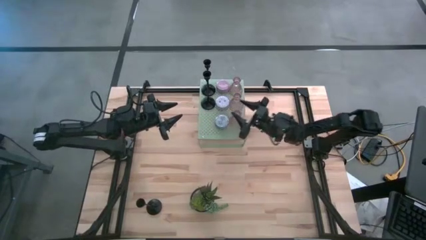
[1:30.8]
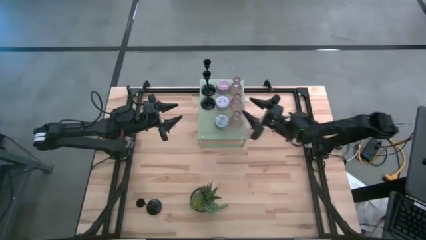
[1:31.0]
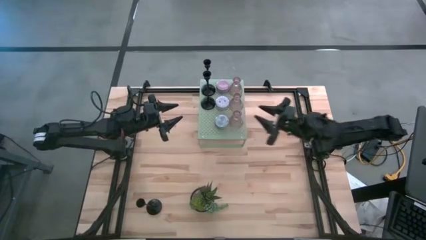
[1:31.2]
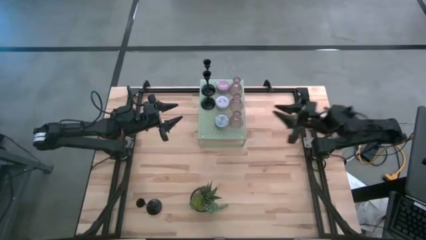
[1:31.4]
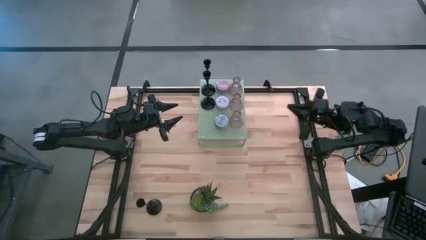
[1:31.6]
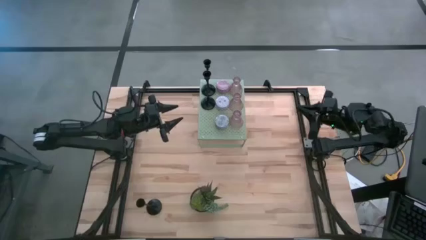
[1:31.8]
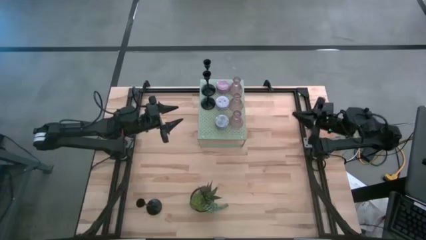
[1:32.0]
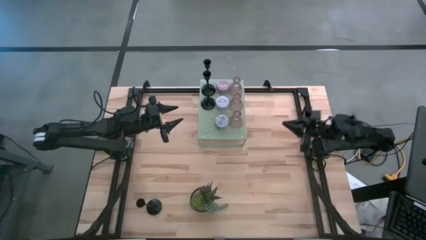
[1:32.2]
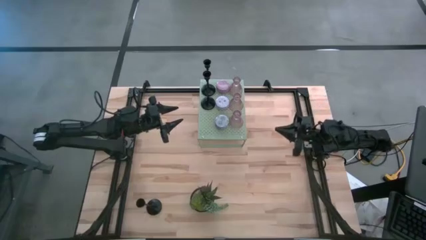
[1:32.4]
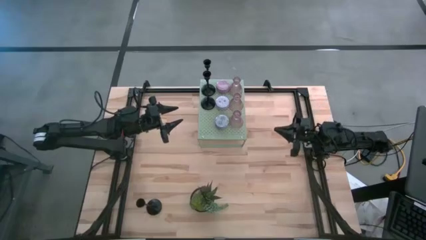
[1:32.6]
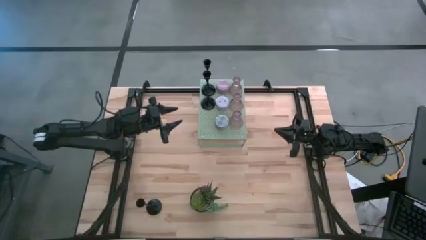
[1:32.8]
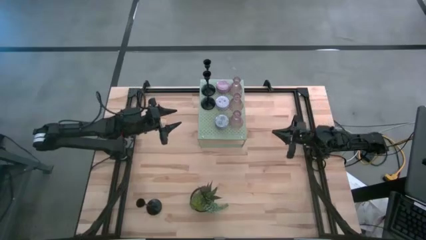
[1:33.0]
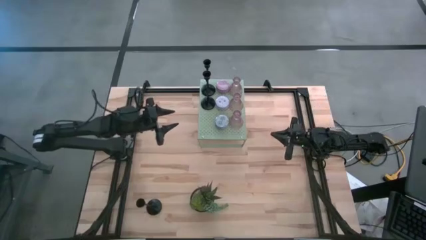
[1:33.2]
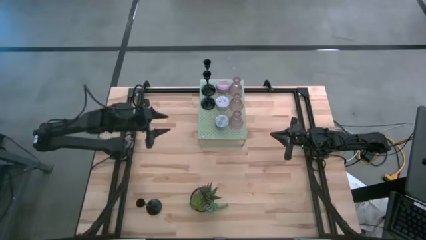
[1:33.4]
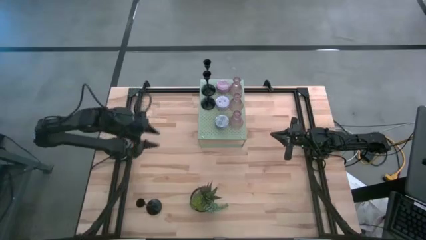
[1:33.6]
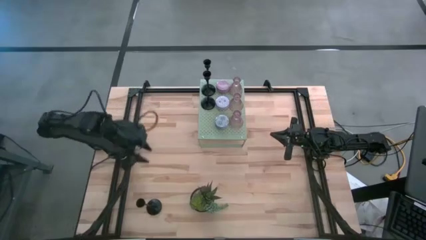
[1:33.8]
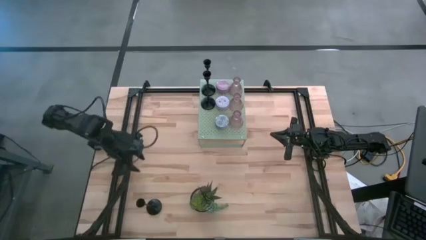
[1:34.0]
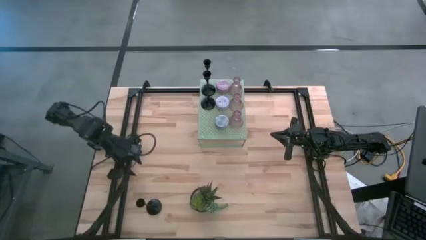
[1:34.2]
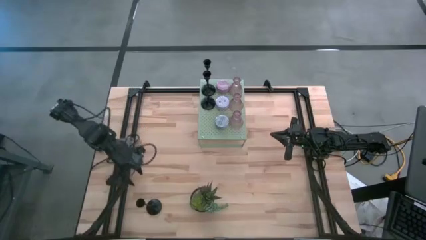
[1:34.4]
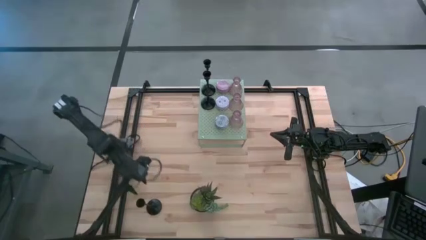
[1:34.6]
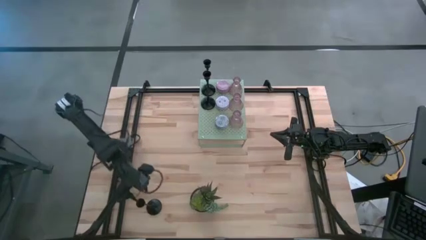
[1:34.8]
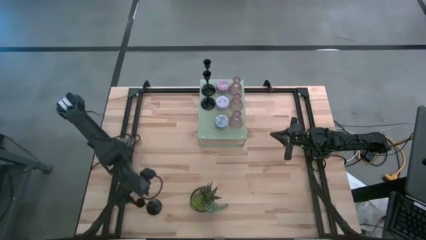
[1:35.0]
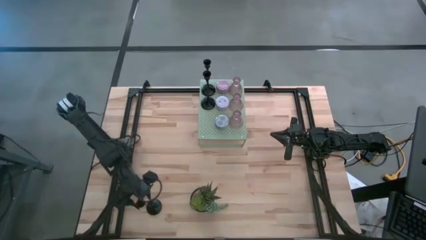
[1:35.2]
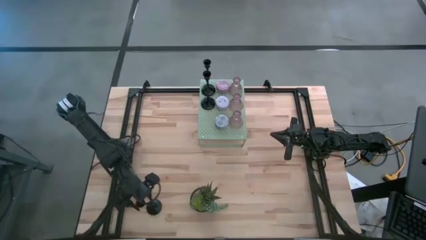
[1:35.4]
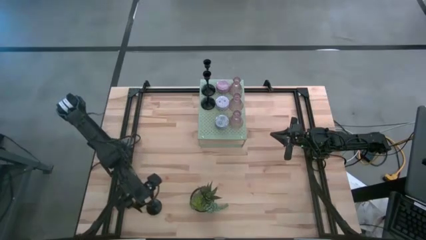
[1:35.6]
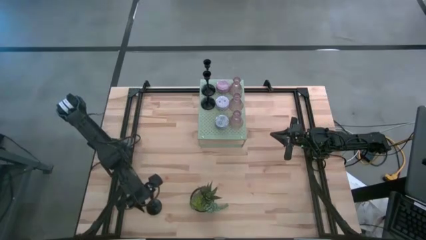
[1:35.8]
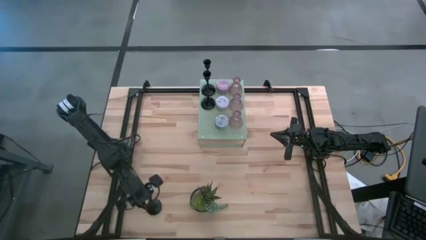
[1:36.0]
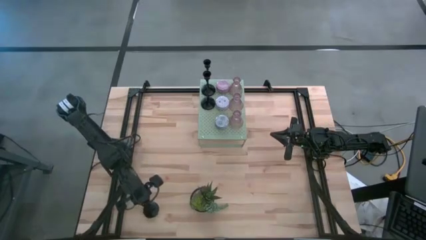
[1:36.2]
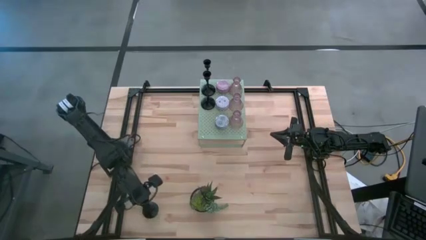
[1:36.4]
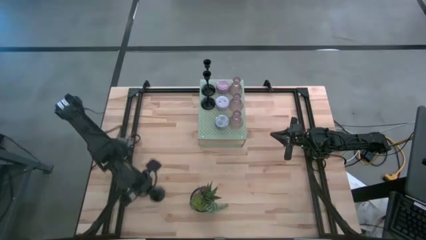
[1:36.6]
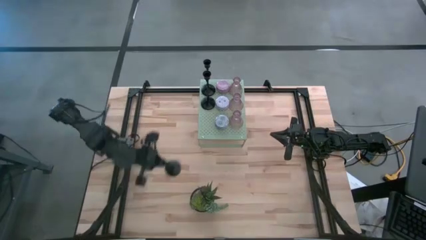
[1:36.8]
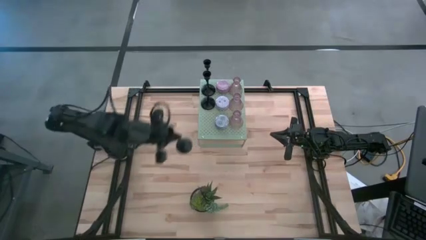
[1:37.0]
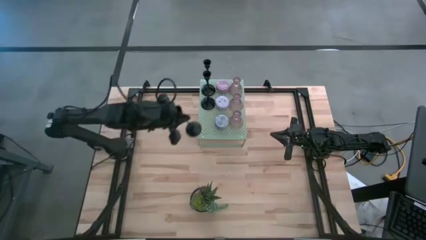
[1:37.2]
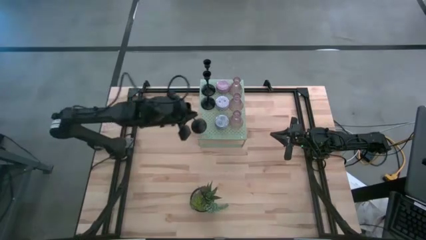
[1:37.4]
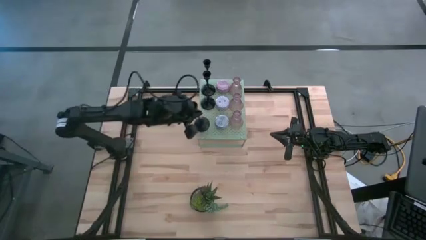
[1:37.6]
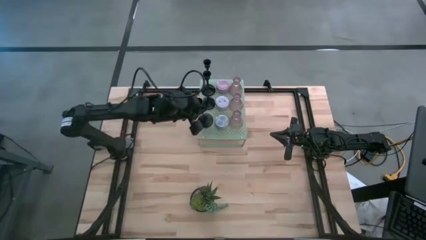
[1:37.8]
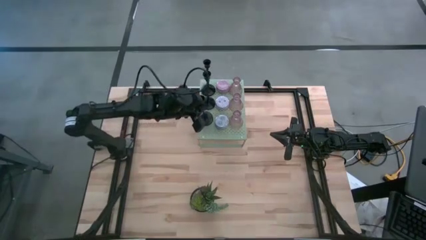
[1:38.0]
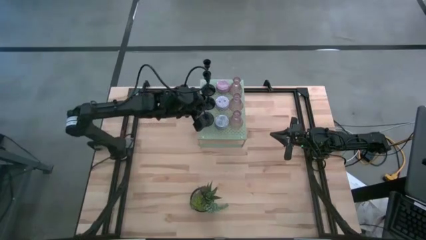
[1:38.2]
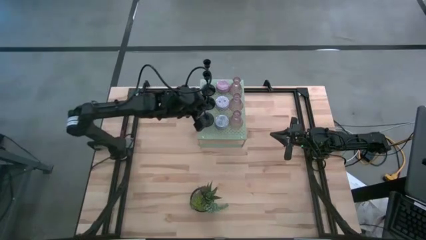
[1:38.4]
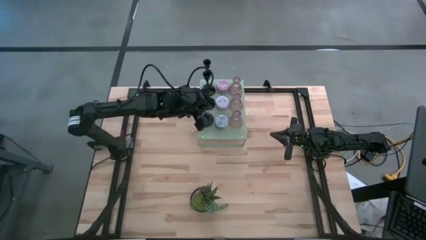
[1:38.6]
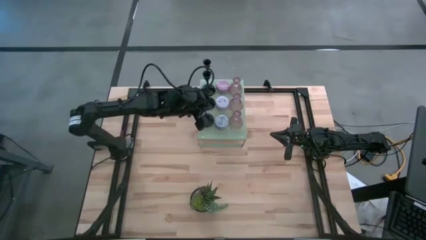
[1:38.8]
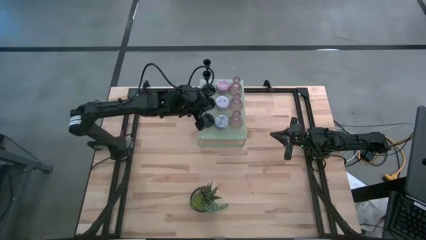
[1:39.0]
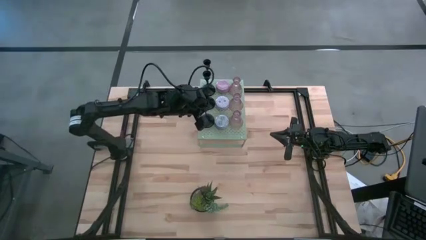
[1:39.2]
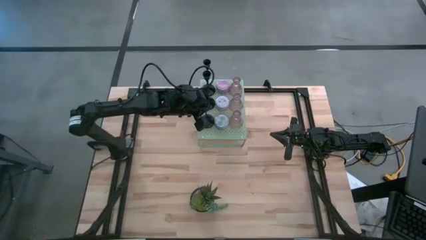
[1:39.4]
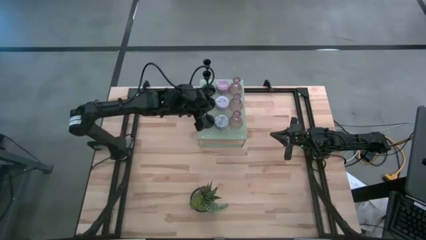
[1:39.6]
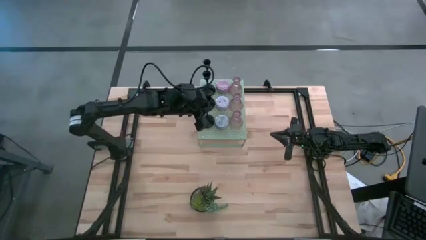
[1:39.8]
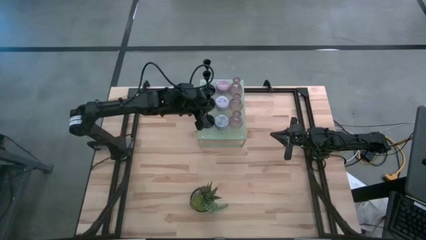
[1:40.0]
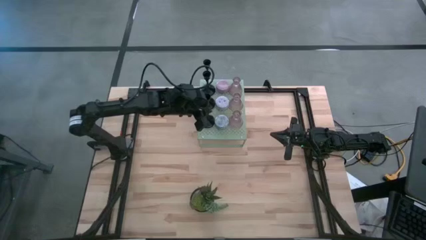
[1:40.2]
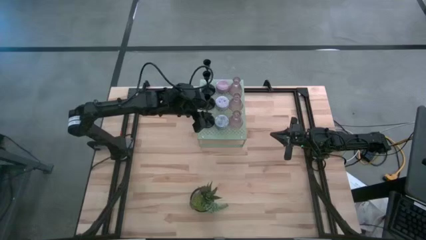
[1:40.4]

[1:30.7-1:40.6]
Task: Pick & Place candle stick holders
Put the black candle holder on the shelf aligned with the other black candle holders

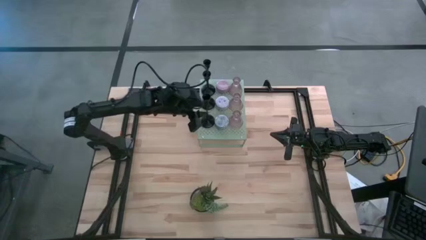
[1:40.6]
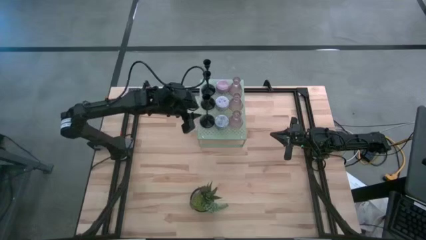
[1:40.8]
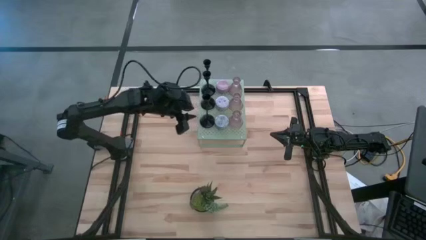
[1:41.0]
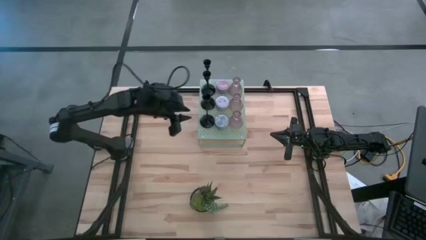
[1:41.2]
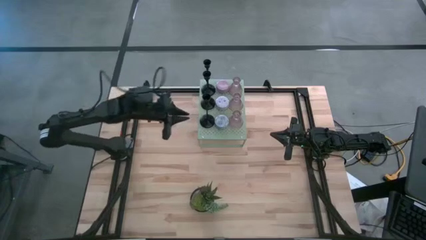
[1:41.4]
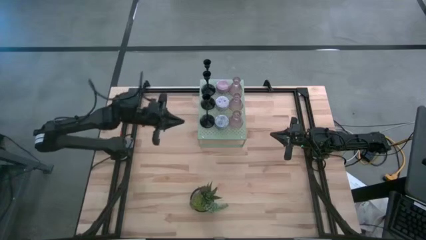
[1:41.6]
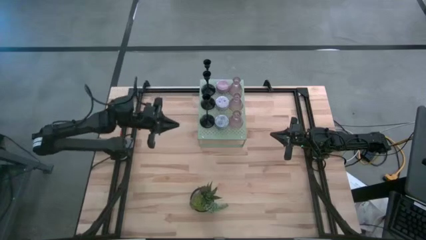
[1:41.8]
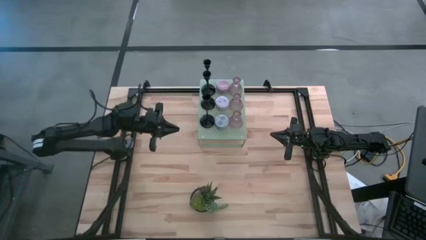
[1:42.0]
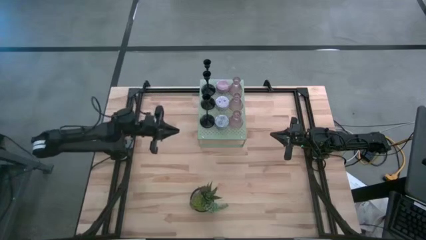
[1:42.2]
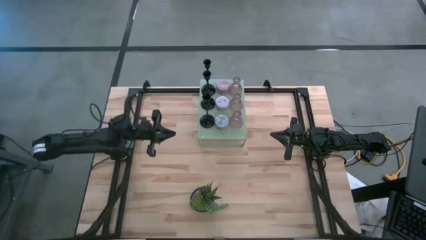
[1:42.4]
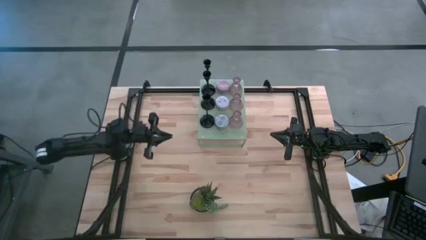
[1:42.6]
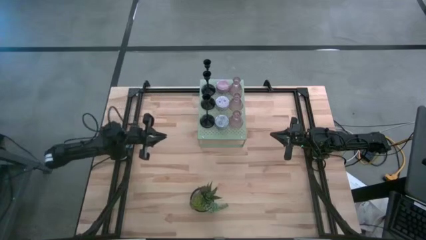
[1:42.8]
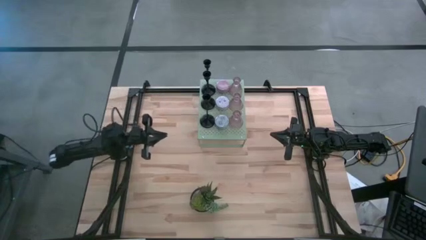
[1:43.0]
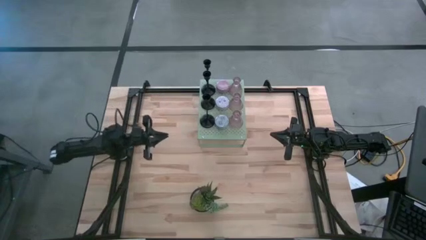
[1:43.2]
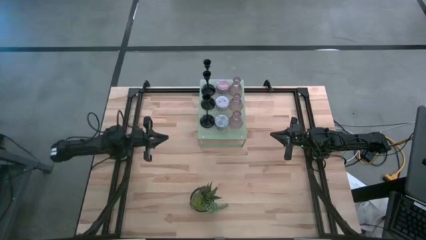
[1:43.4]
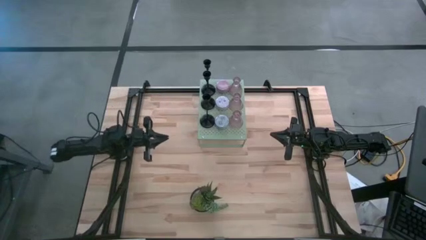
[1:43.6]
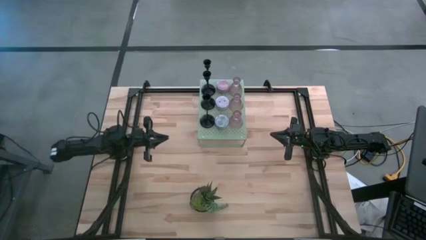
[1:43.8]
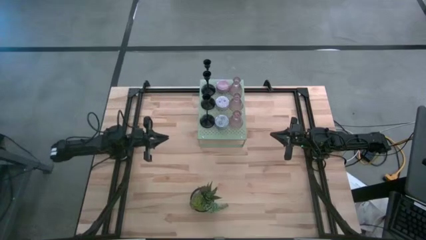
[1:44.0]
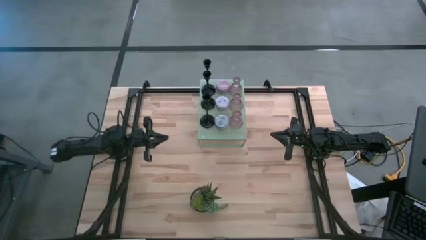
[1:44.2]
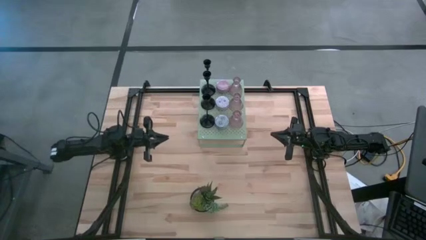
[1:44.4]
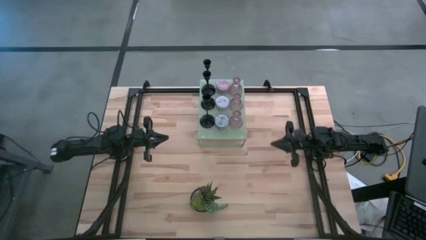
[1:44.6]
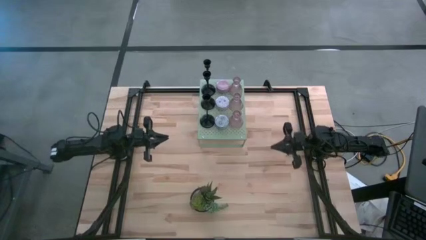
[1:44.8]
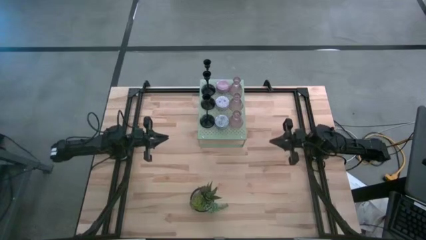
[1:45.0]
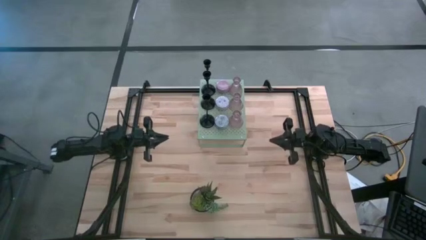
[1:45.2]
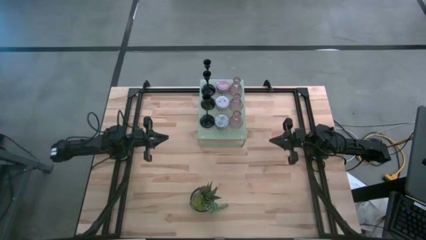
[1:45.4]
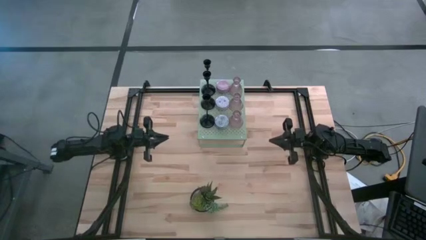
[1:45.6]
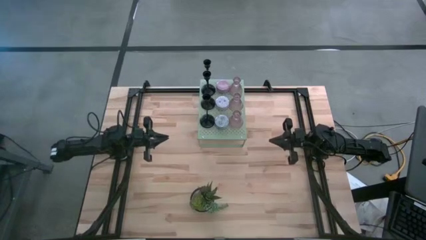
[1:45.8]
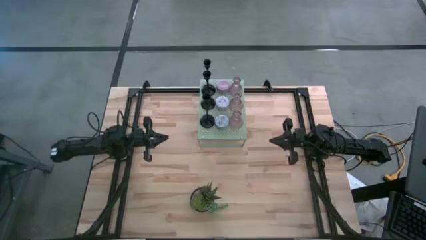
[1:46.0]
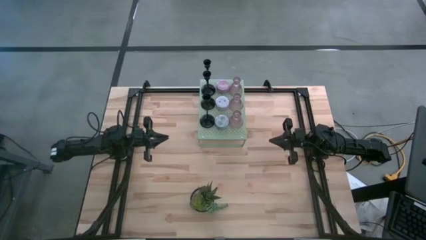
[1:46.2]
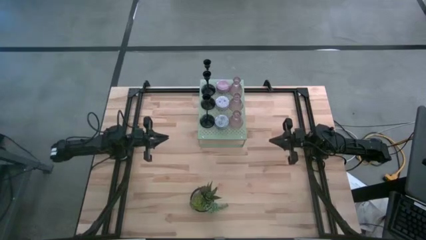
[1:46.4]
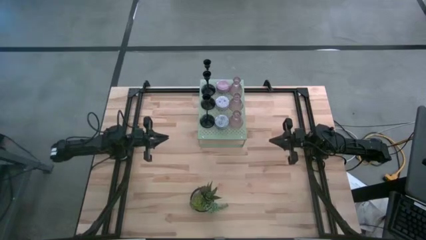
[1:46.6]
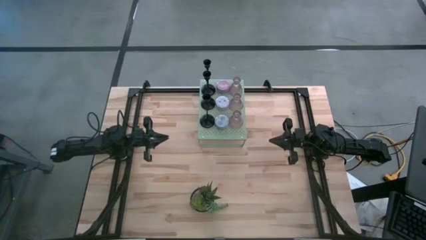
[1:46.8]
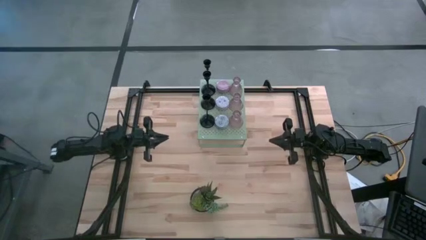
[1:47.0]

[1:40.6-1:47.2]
Return to Home Position
